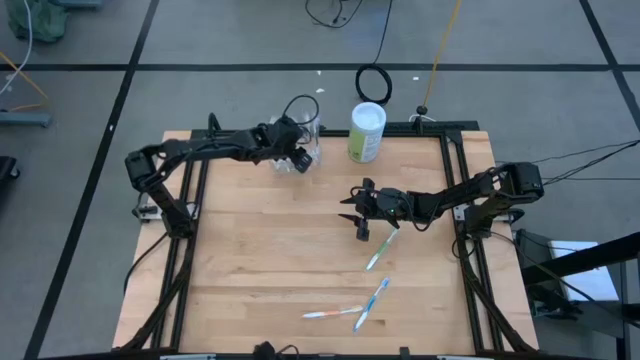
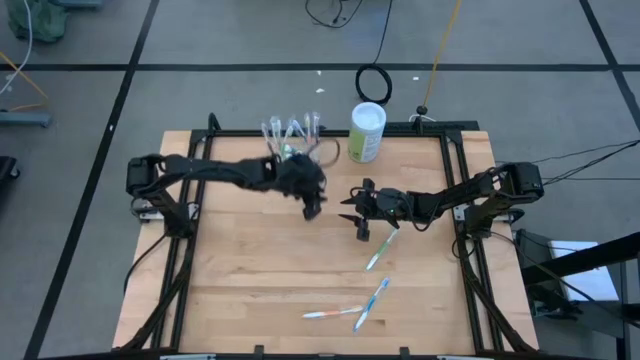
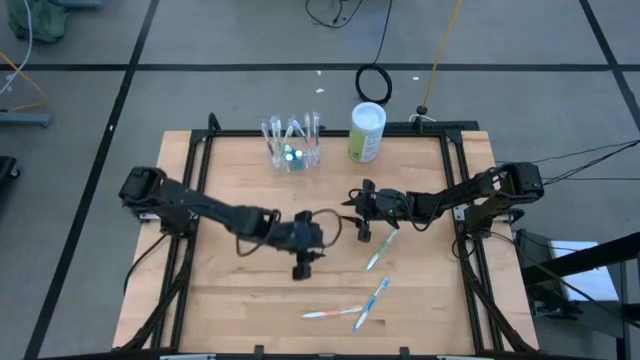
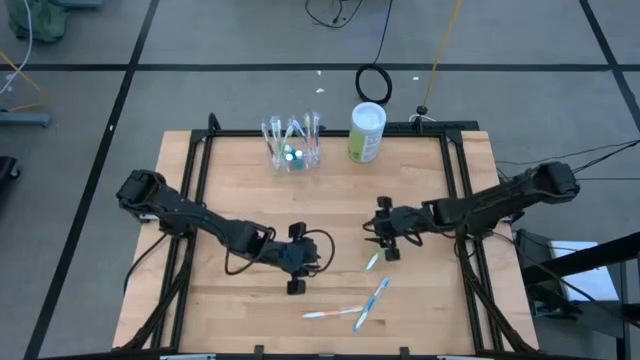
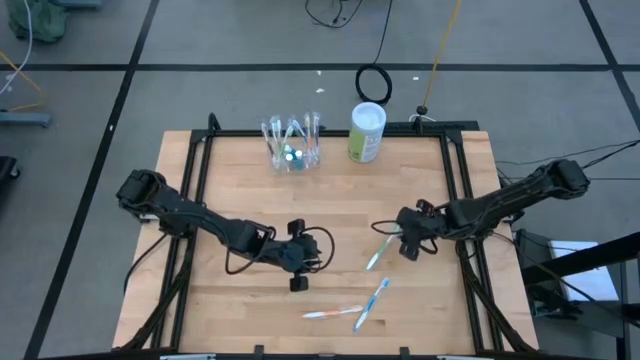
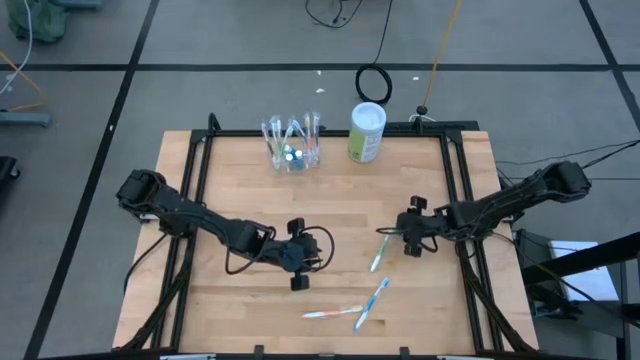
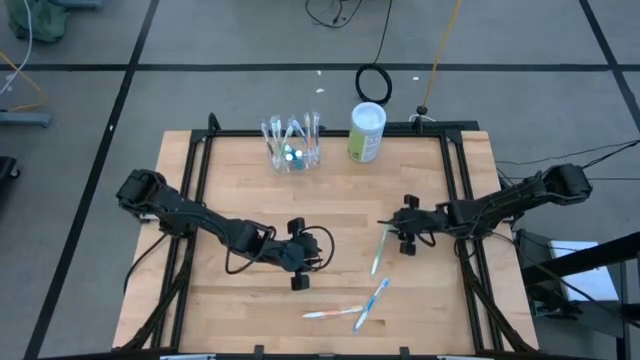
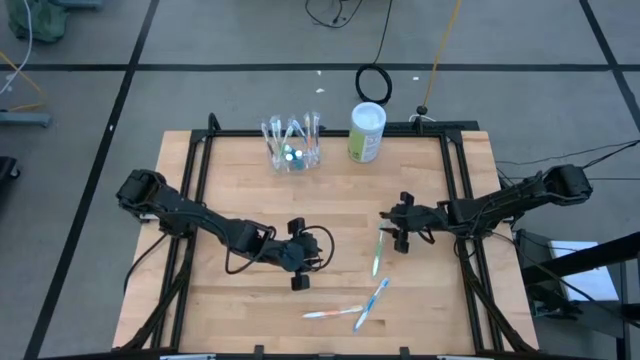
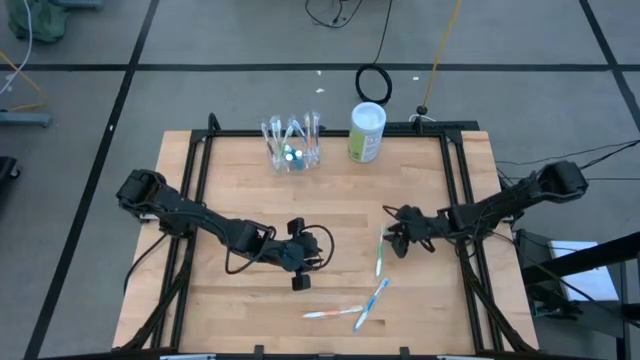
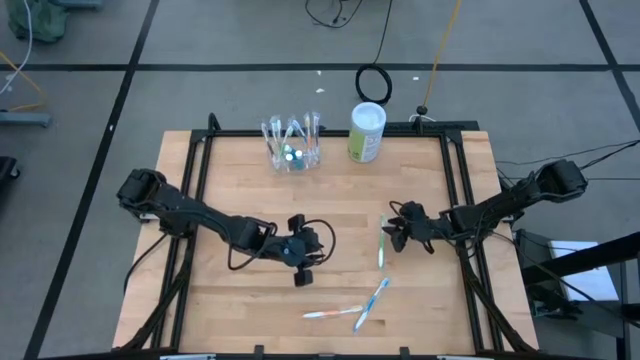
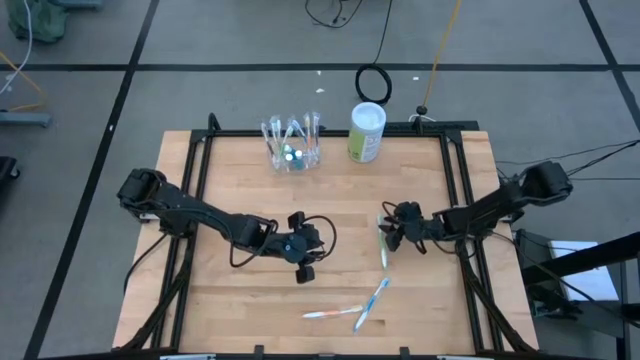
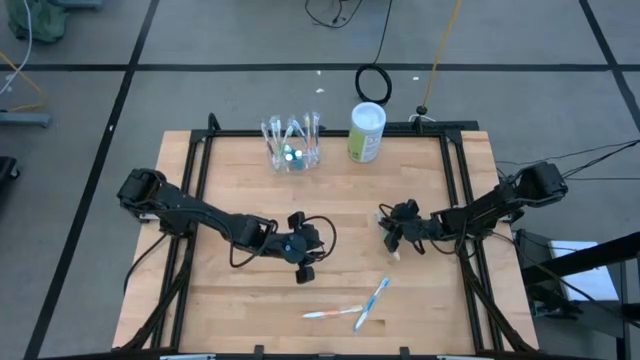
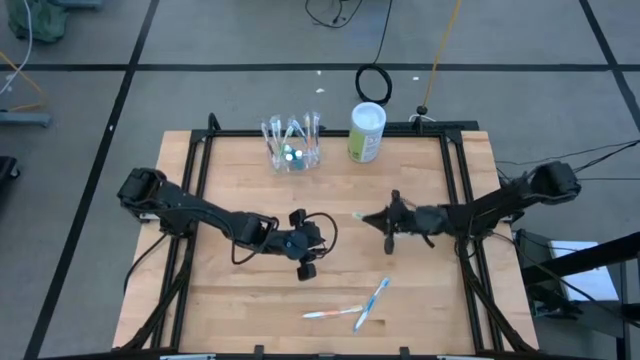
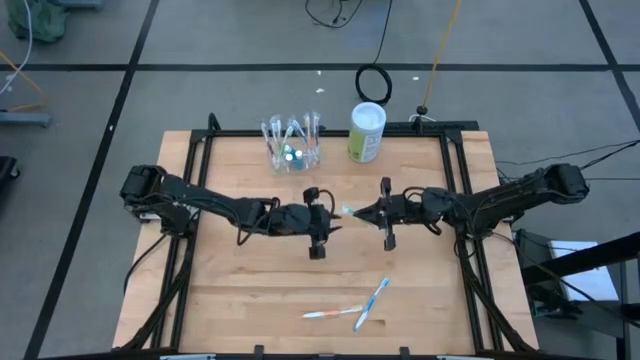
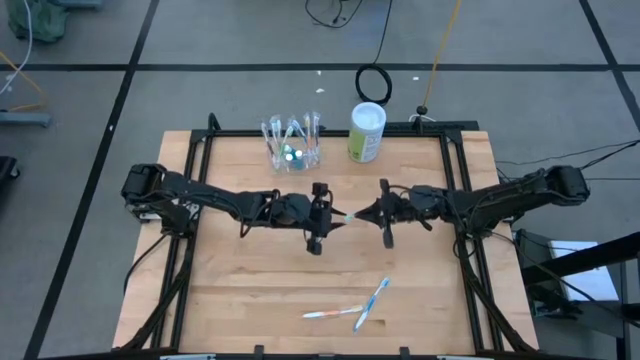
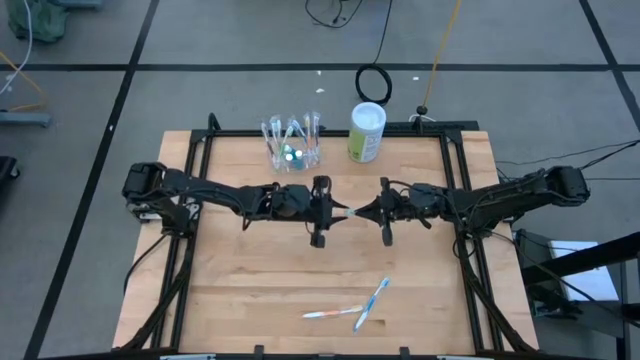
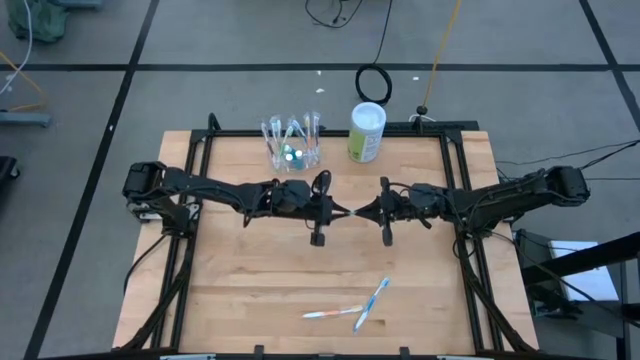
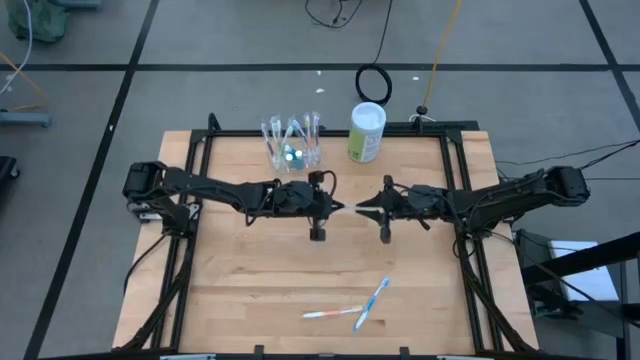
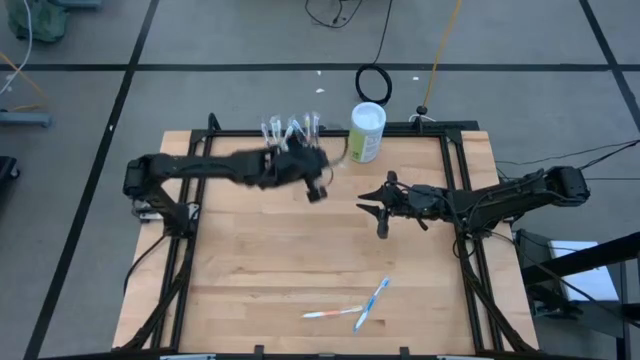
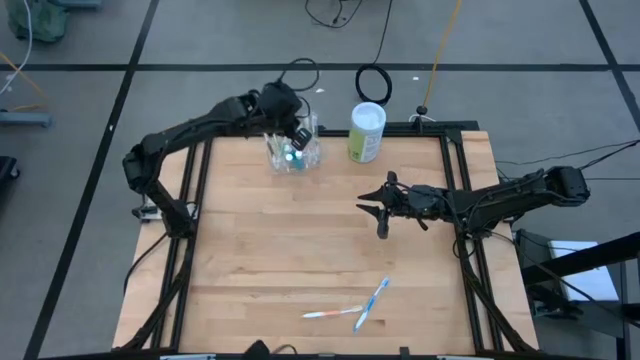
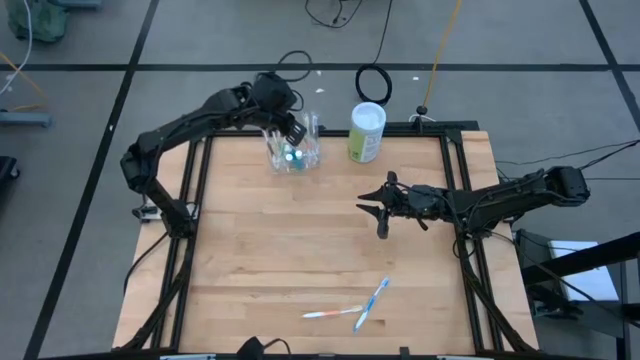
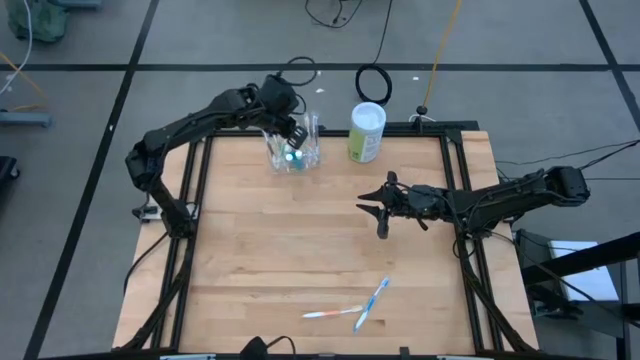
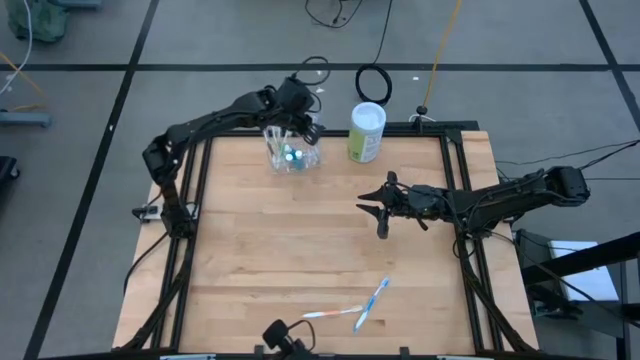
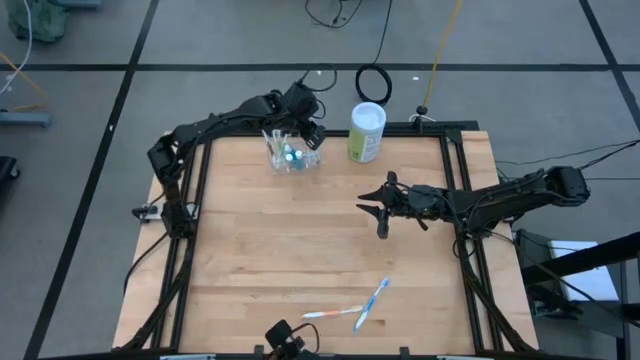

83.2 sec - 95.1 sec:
Task: Pick & Place toothbrushing station
Put the green toothbrush into the transparent organizer

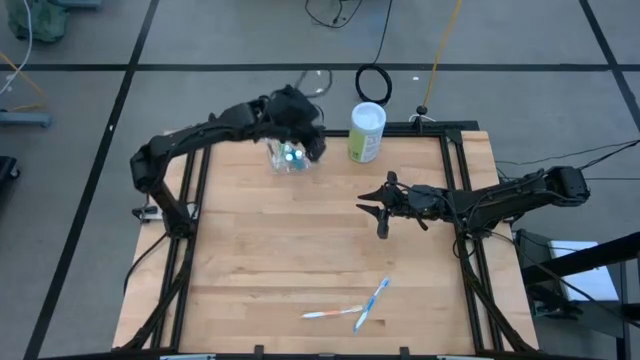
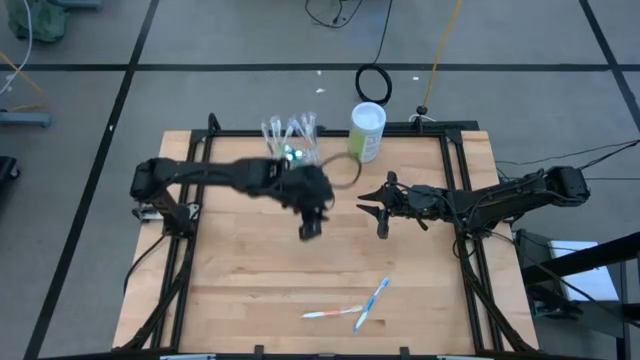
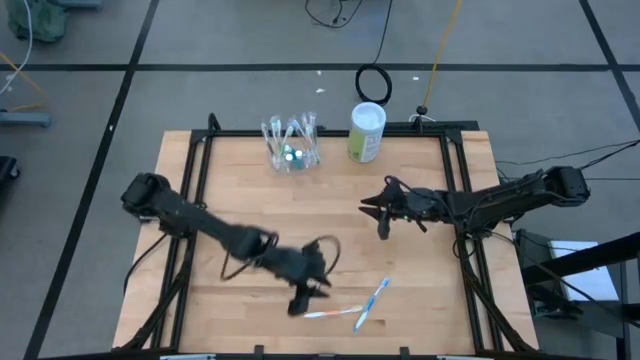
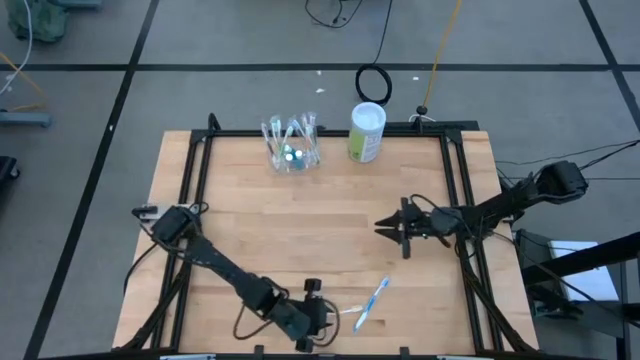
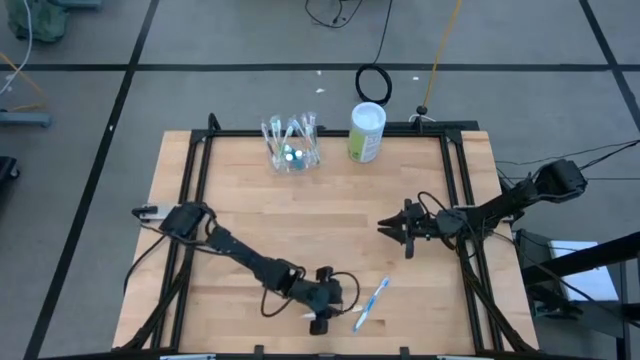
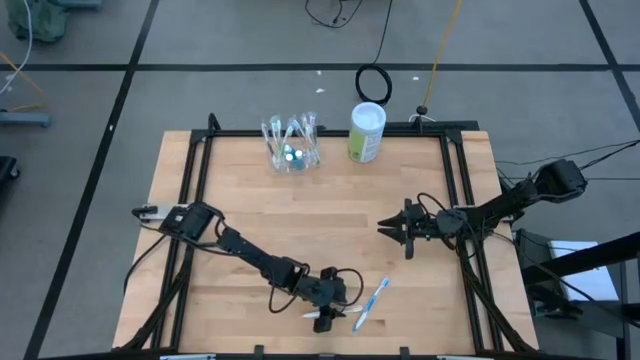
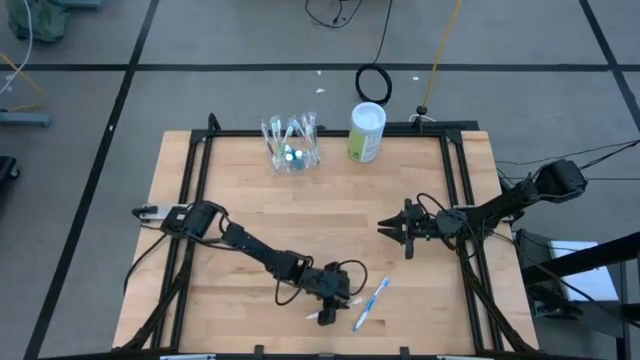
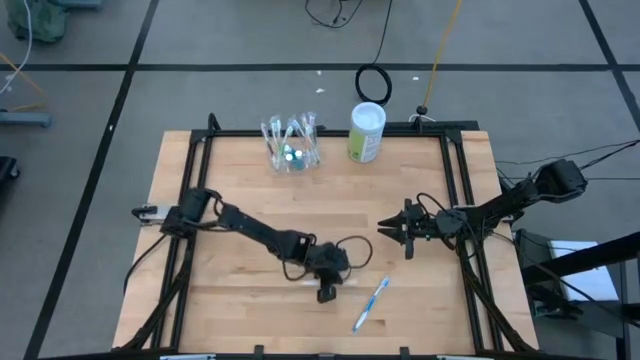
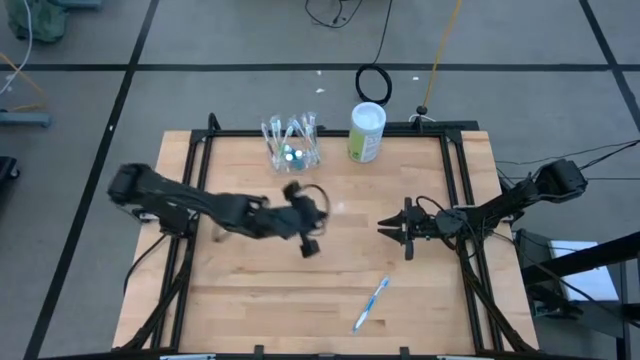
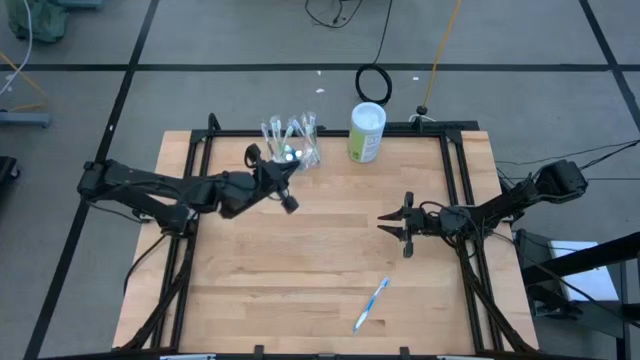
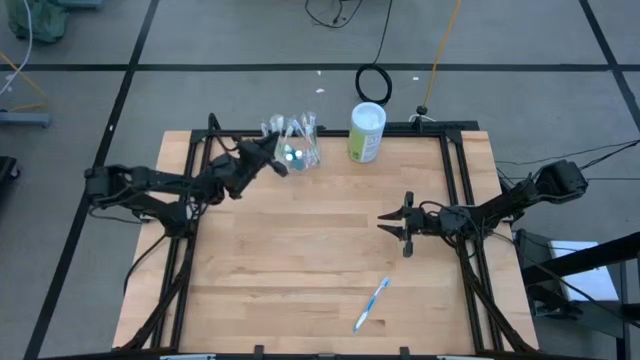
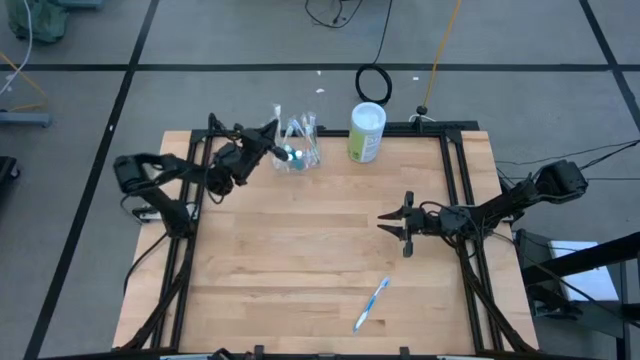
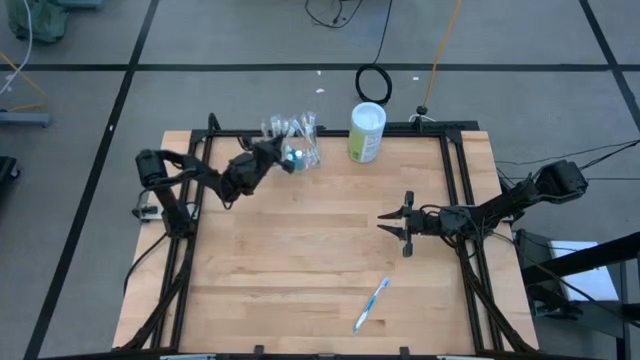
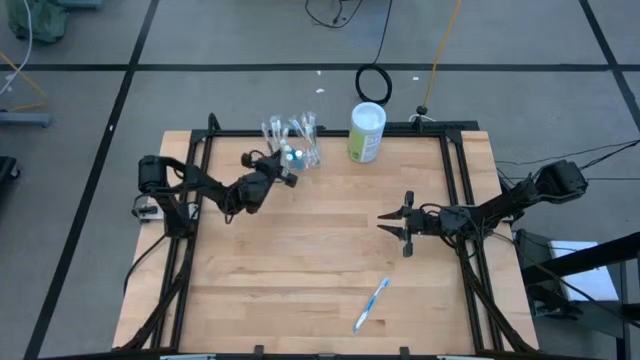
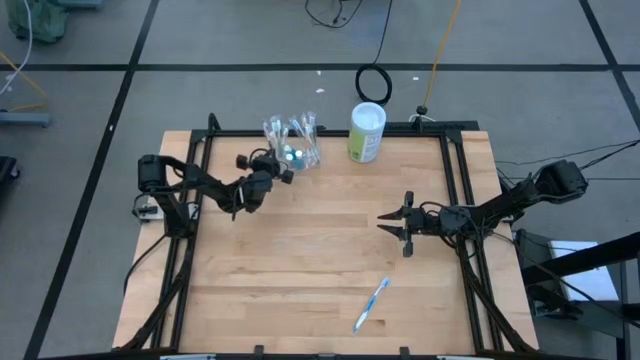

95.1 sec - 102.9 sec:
Put the orange toothbrush into the transparent organizer

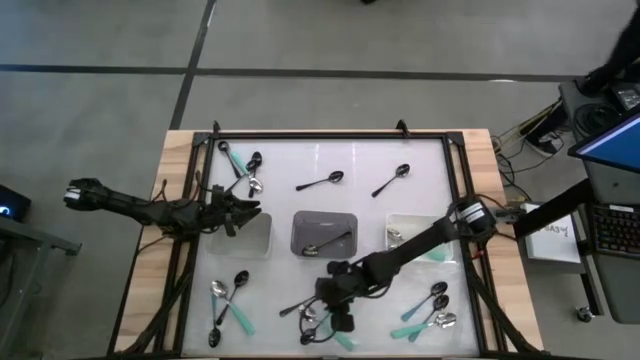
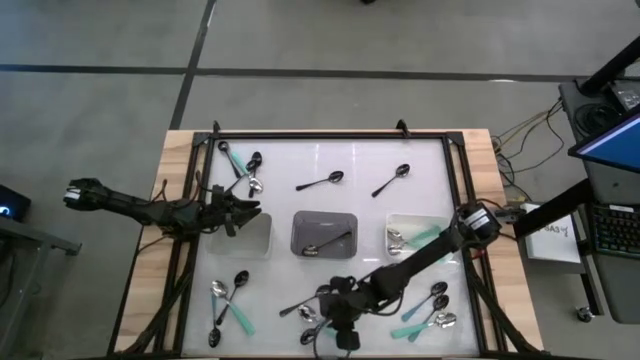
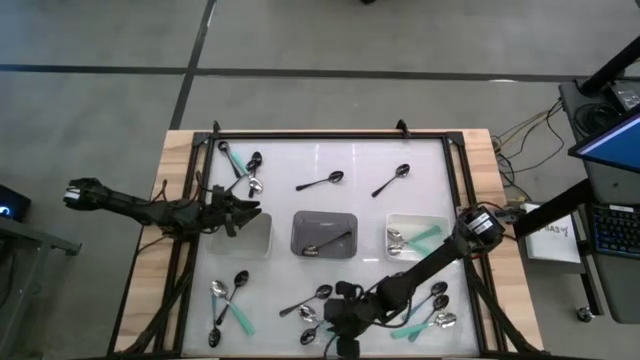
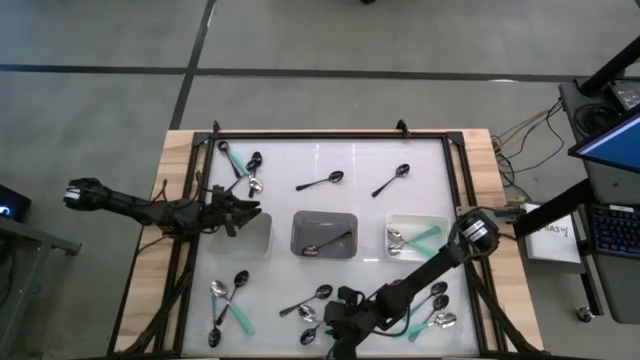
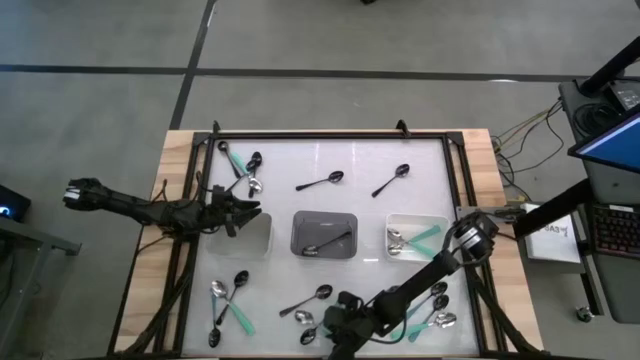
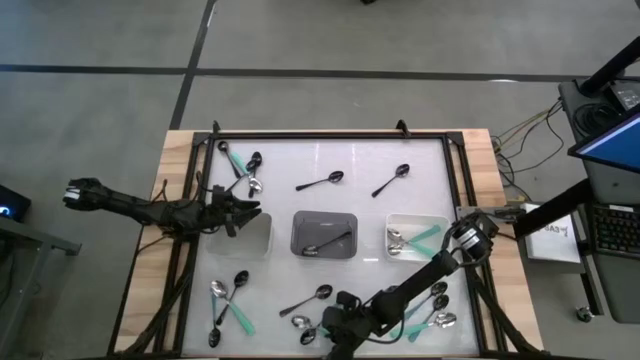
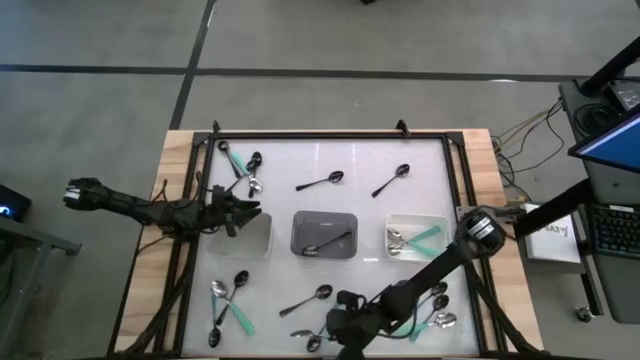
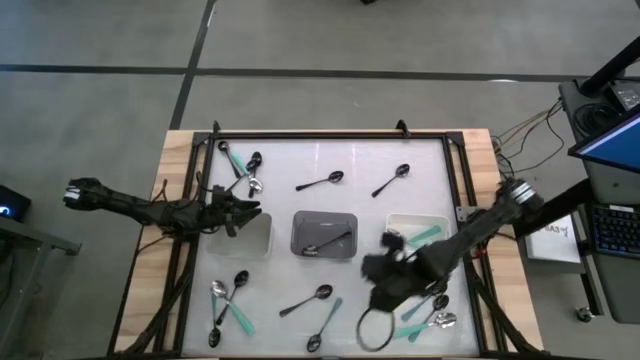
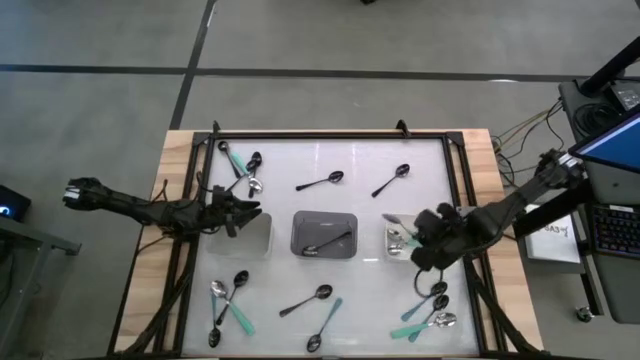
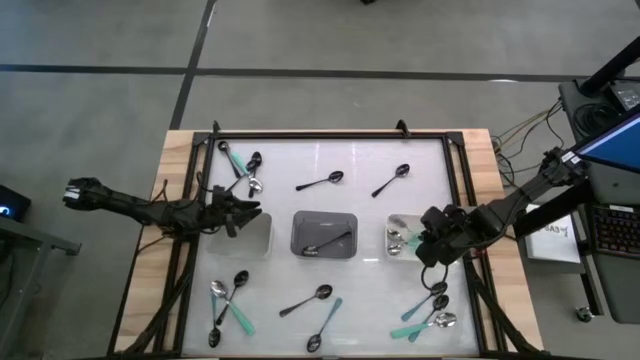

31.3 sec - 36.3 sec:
Task: Sort silverware by color (type)
Put the green spoon into the white bin
